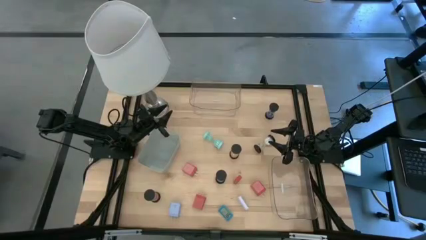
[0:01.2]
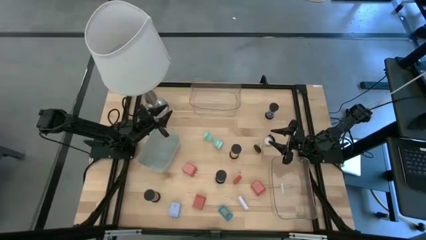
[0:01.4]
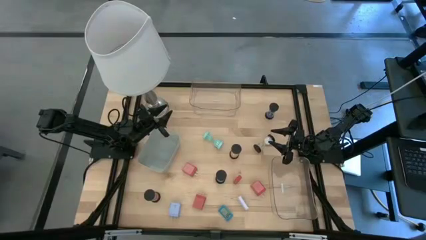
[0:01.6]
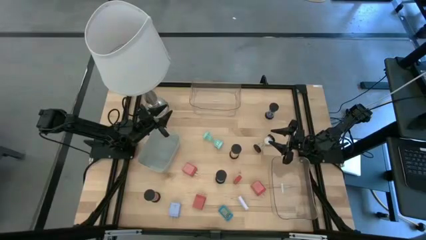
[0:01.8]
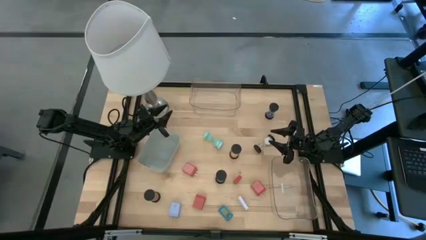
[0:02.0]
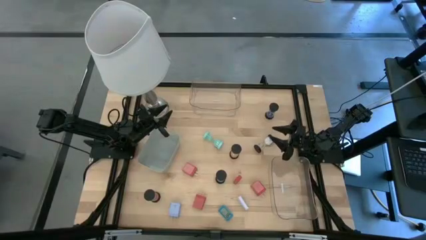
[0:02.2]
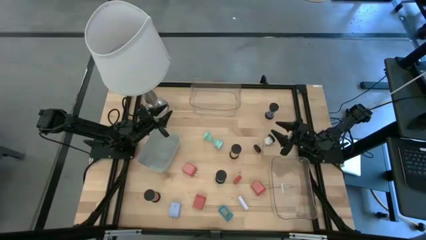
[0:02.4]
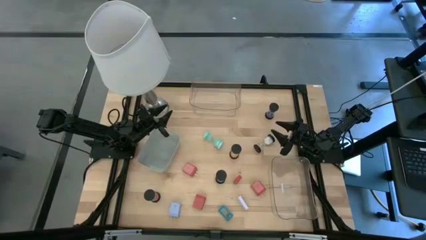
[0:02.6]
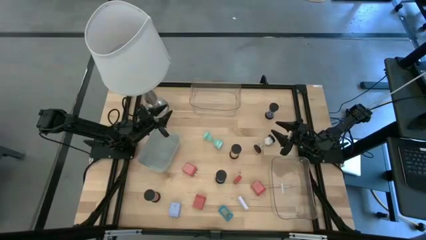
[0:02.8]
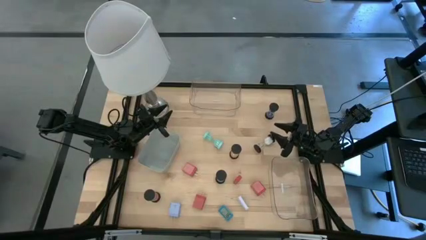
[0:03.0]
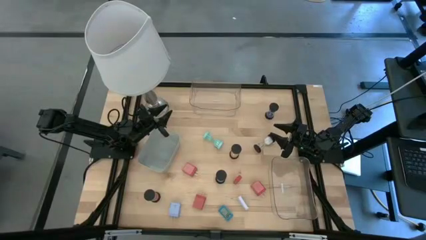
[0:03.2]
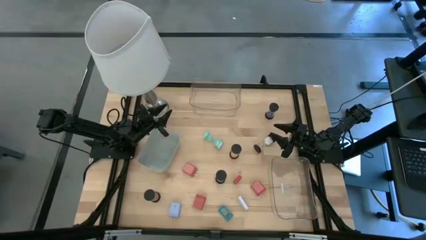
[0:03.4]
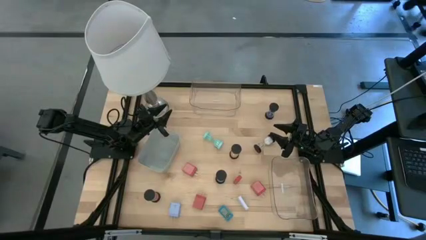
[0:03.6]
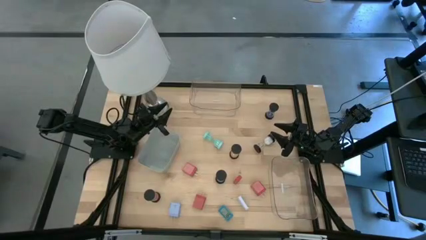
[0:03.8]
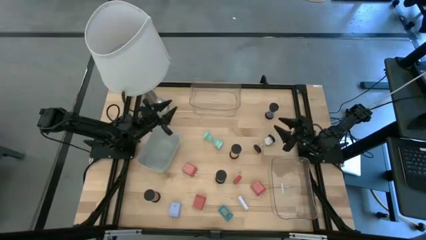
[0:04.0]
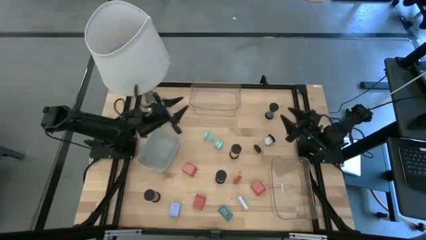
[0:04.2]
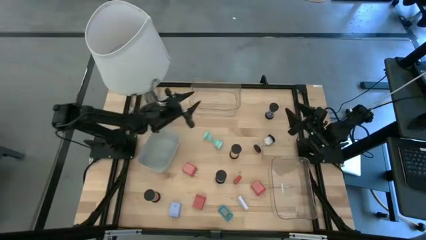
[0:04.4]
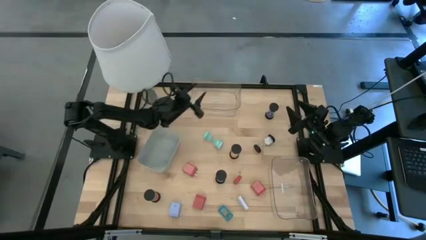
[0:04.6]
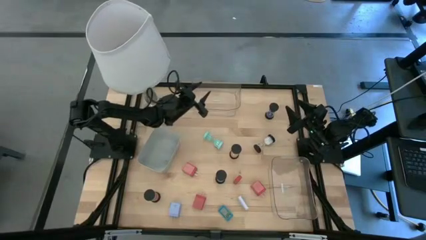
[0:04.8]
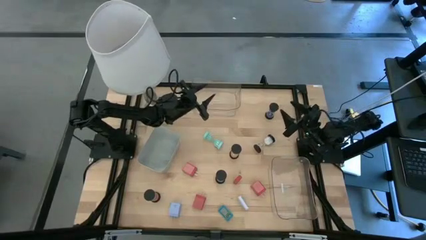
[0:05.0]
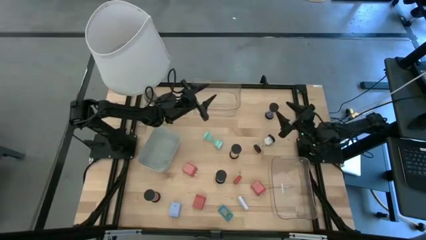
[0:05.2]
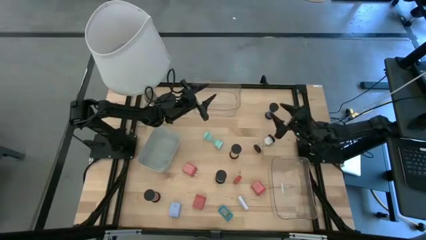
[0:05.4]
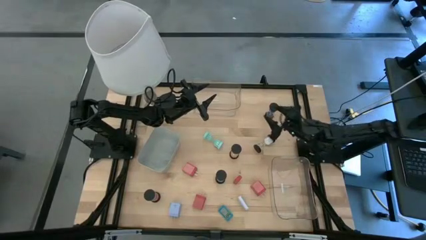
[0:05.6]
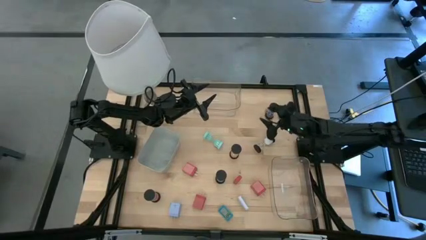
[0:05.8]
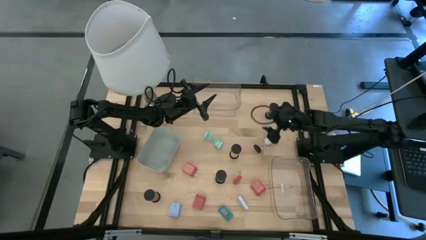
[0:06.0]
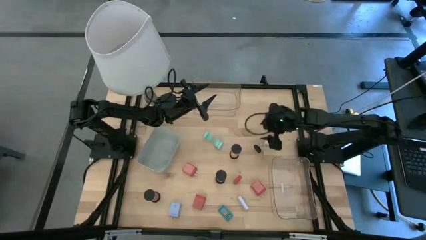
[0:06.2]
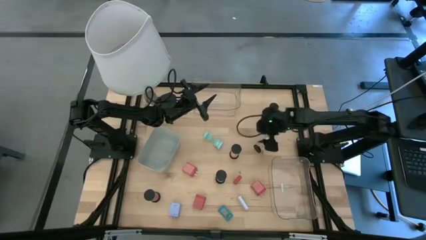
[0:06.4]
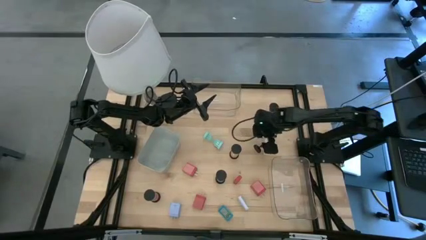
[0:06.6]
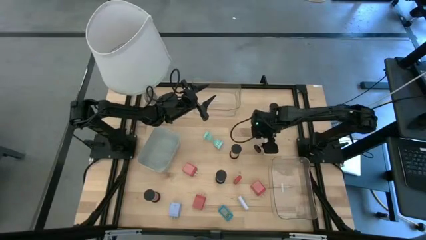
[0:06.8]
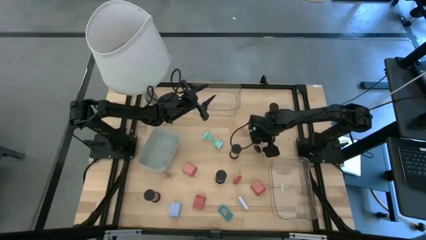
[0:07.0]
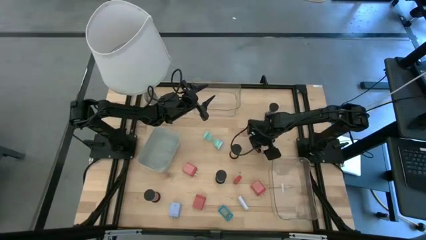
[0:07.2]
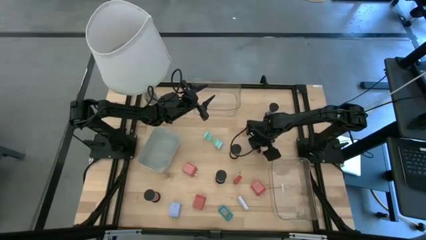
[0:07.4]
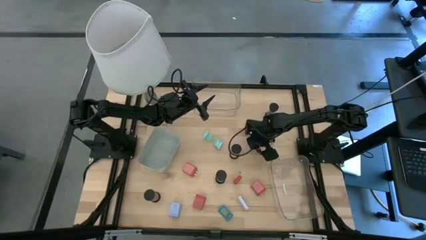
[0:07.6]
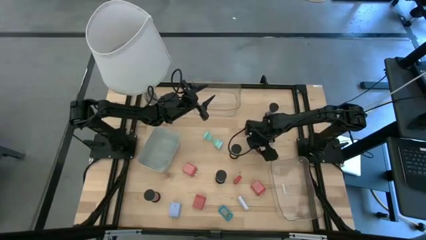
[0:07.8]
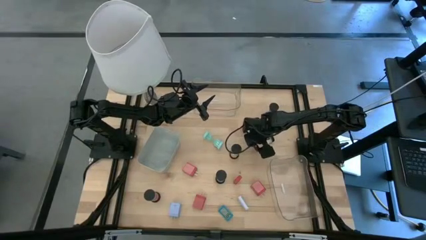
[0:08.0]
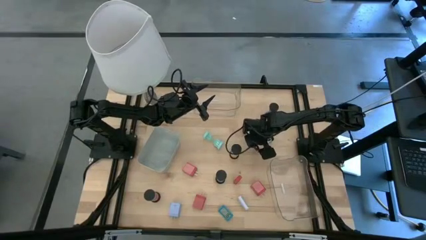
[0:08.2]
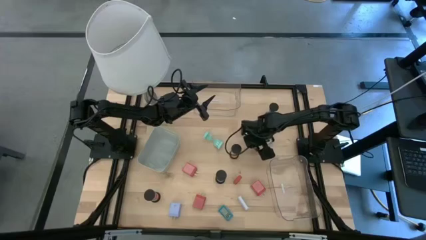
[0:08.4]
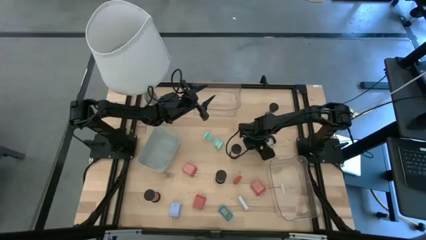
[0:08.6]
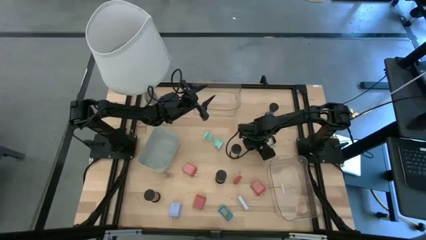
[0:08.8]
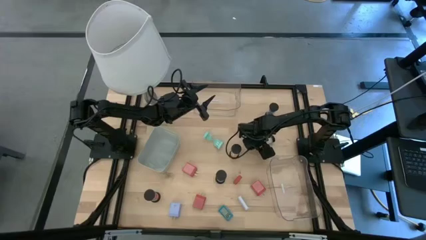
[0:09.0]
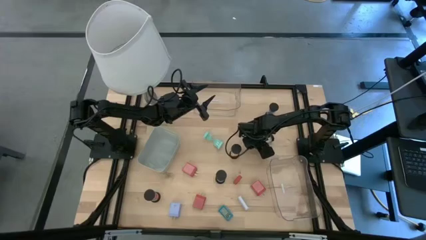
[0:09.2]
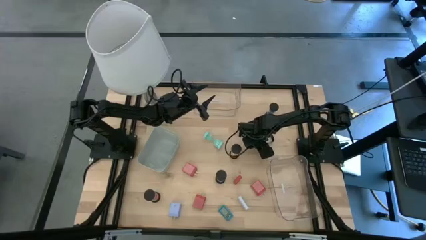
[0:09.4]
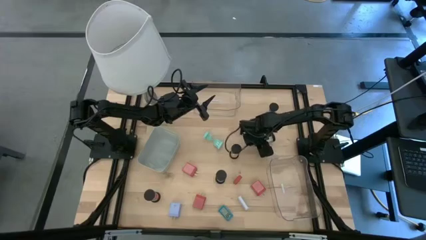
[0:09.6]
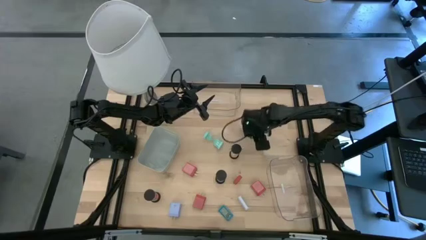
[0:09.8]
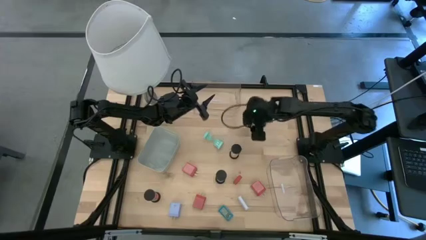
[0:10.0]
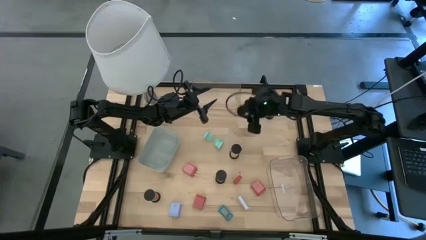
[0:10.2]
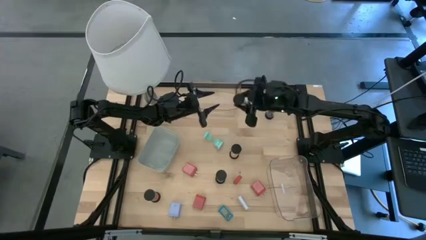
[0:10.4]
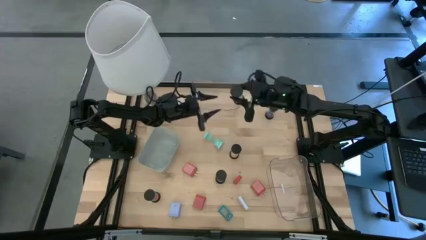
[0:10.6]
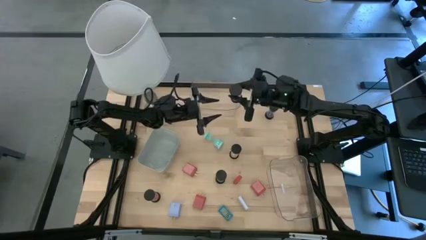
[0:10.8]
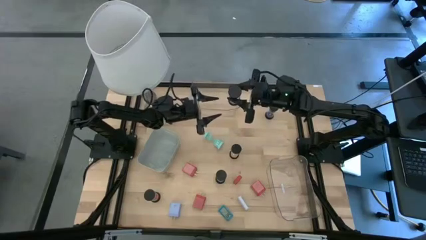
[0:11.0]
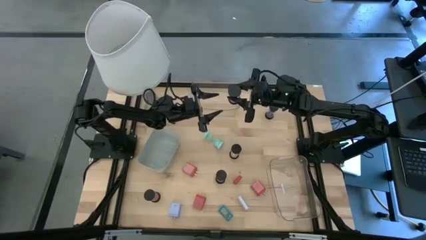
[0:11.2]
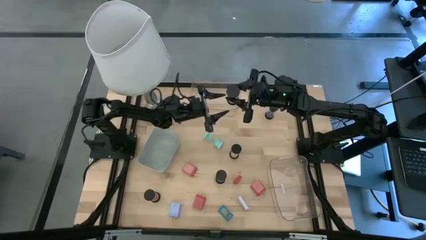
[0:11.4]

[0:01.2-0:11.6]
Task: Pick & Place Office items
Put the white hourglass into the top transparent bin

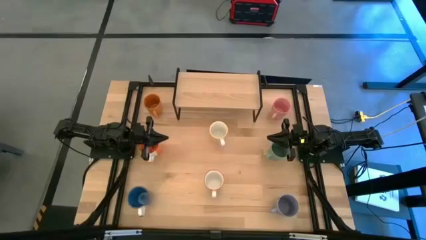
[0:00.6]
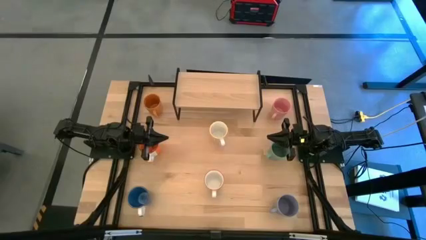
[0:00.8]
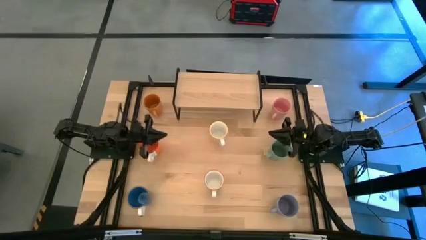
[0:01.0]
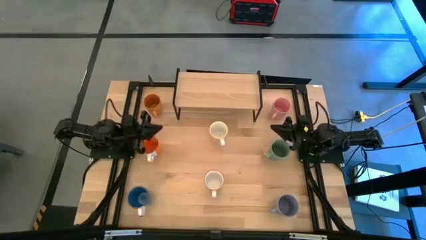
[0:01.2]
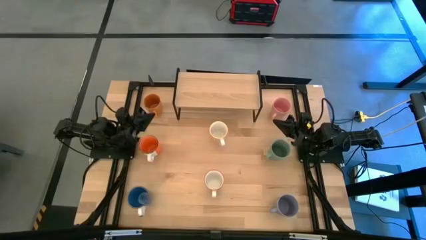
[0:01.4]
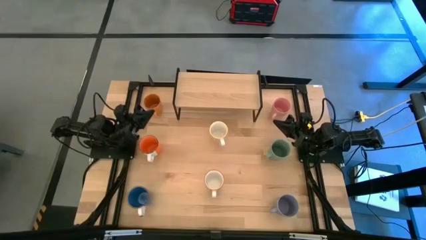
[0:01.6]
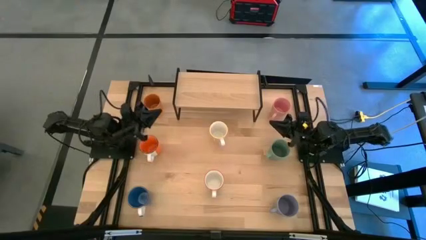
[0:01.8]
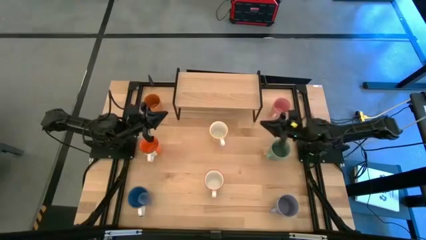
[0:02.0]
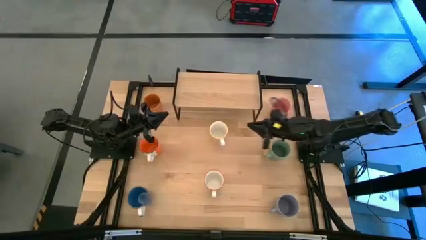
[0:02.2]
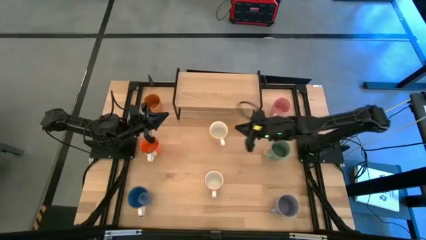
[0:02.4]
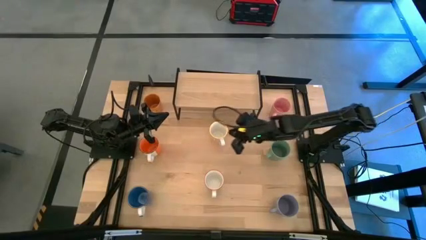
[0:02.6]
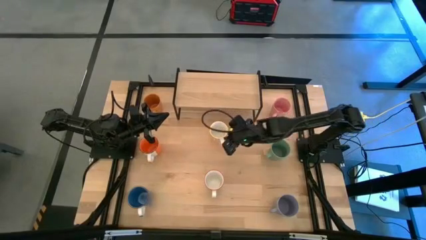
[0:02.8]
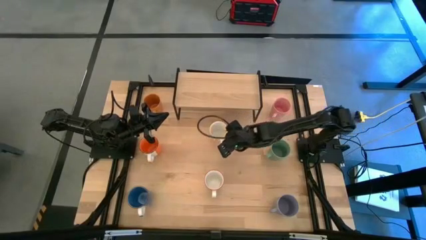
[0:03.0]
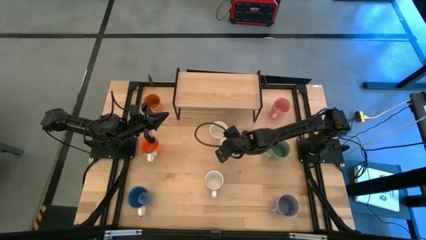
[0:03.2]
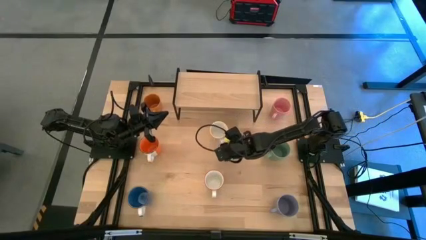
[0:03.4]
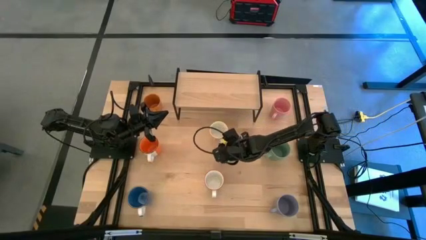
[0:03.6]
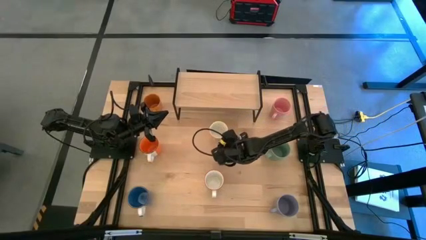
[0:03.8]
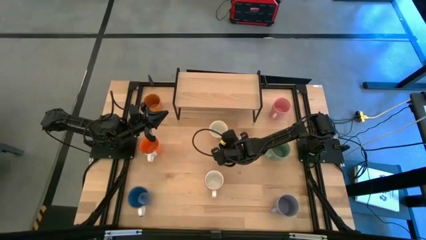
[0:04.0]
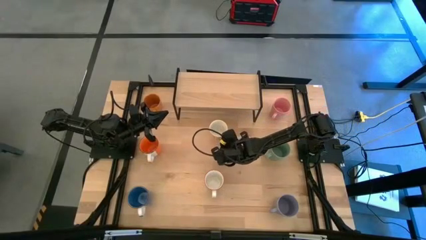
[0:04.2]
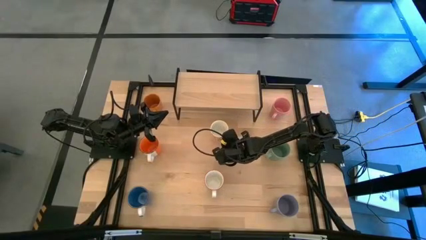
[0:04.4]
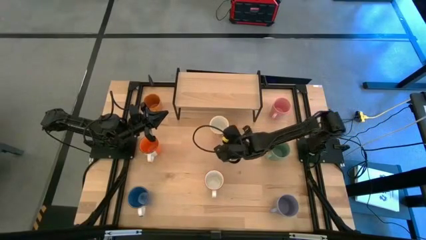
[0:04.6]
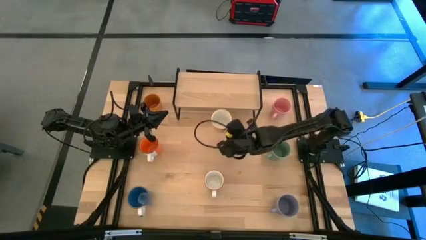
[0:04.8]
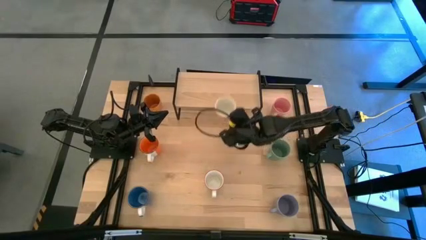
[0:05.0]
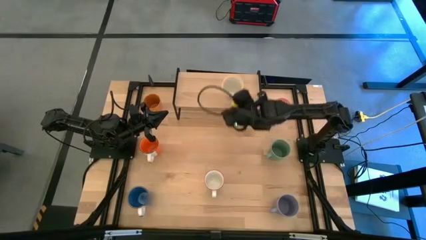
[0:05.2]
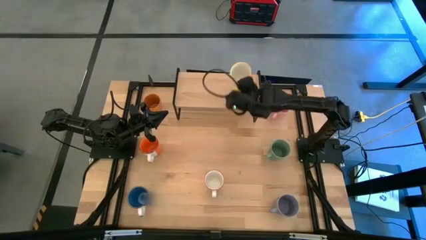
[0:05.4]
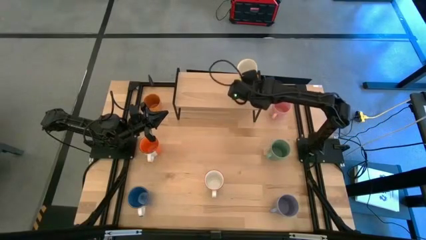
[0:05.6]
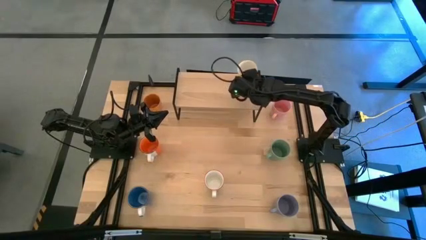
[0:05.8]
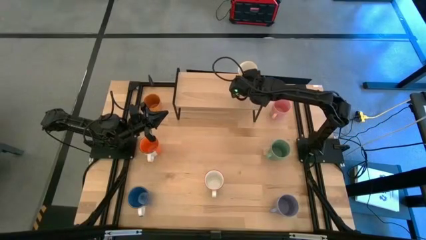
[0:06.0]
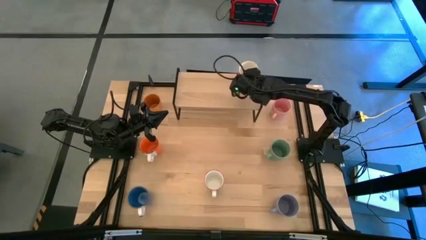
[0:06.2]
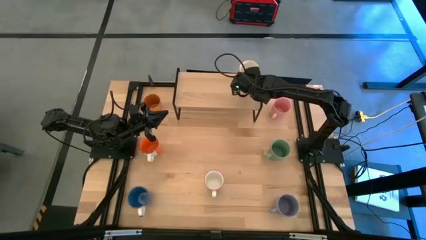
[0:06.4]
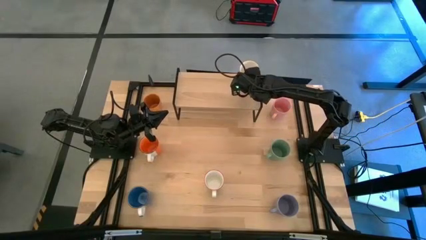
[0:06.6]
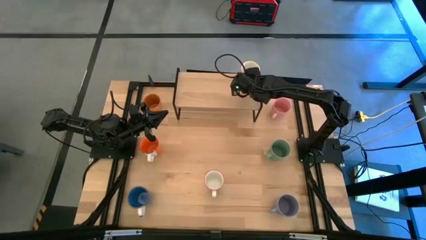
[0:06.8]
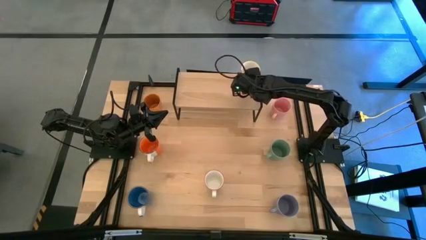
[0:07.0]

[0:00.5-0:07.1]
Task: Place coffee mugs
Put the orange patterned mug on the shelf
